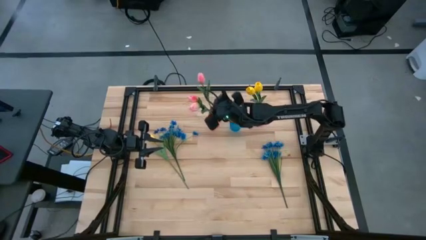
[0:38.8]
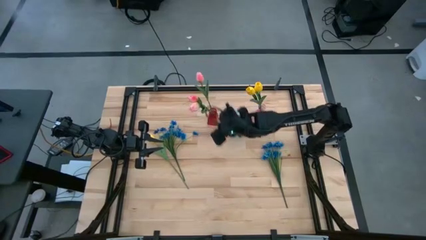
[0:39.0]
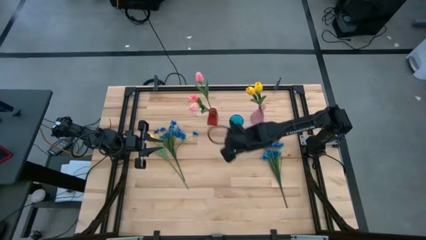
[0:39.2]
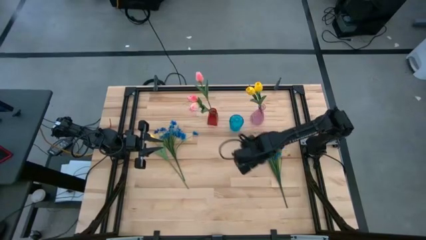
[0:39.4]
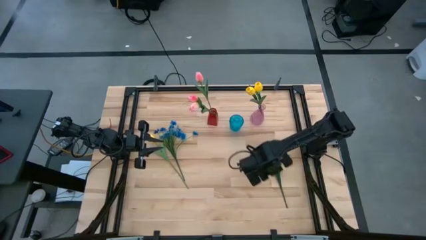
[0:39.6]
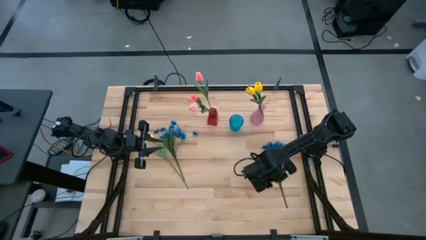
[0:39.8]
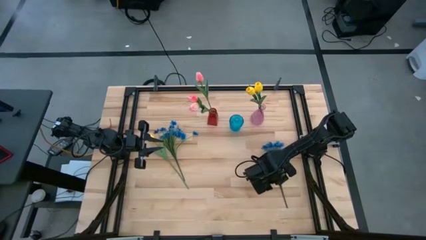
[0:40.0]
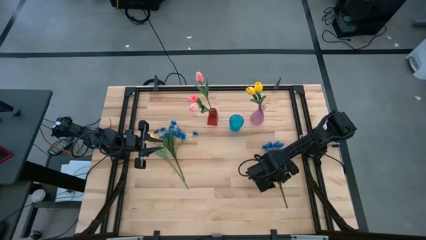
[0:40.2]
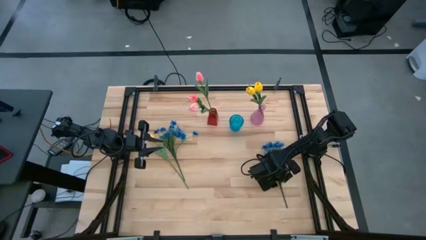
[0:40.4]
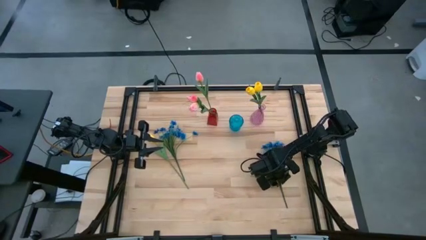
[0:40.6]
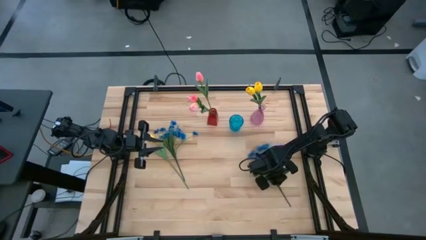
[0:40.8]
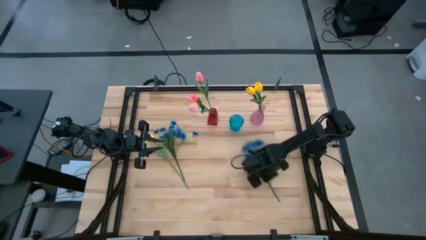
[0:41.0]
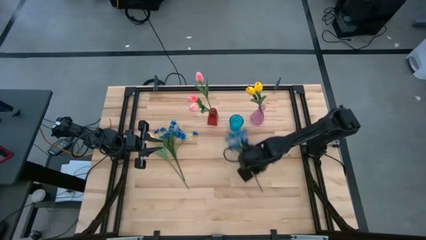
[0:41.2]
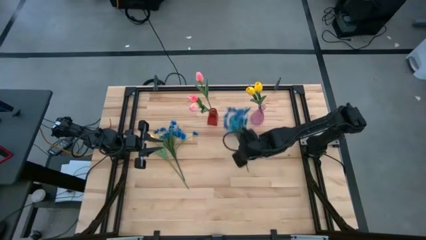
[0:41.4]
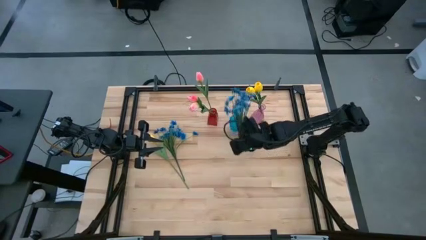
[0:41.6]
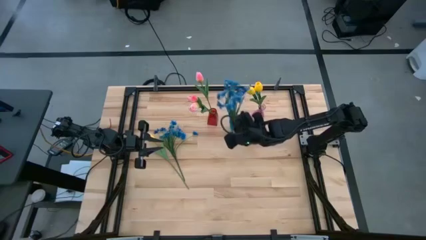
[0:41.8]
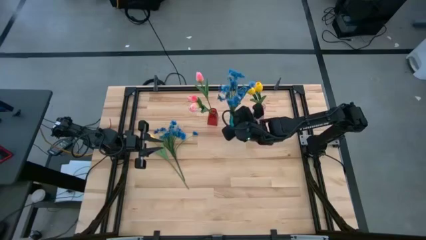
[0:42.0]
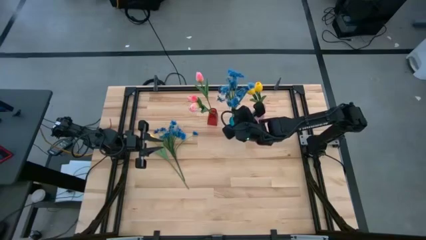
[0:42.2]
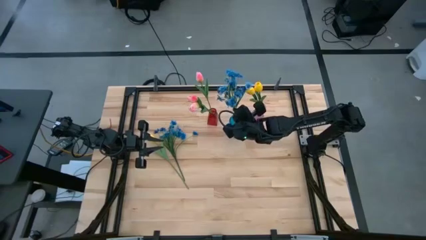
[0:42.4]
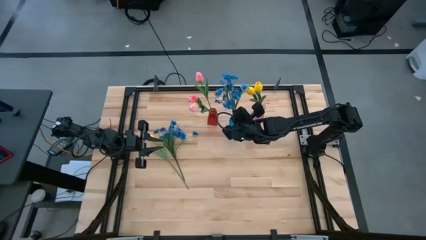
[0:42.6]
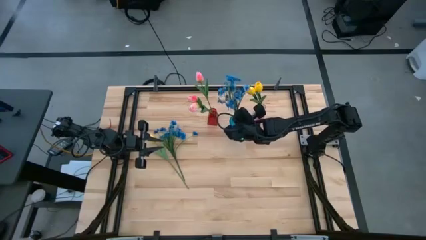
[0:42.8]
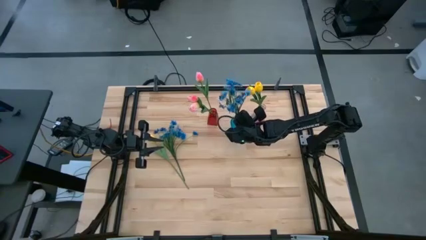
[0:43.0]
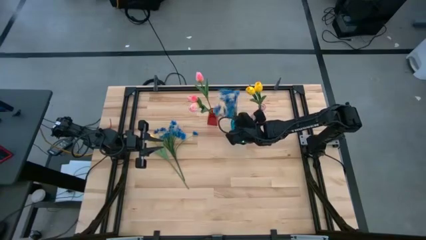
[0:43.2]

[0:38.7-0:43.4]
Task: Sort flowers into vase by color
Put the right blue flowers into the blue vase

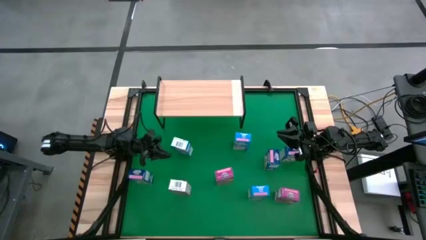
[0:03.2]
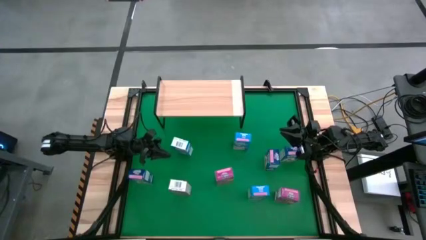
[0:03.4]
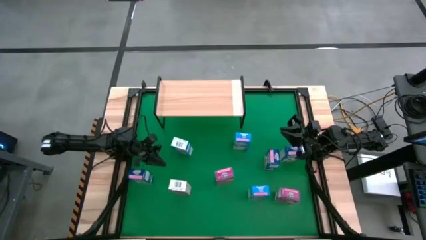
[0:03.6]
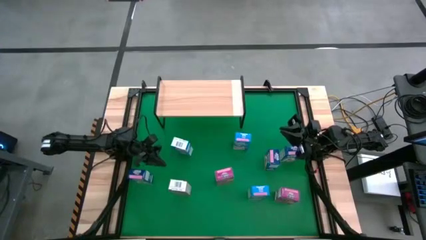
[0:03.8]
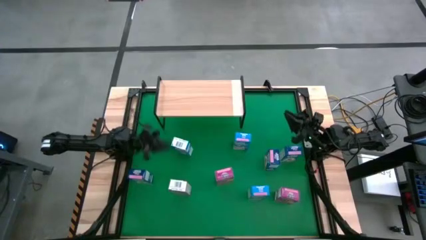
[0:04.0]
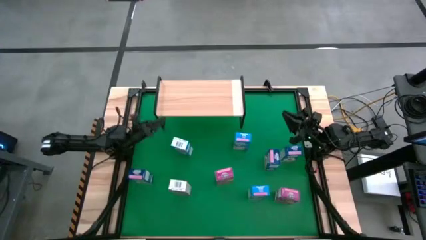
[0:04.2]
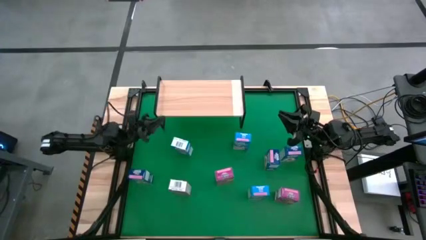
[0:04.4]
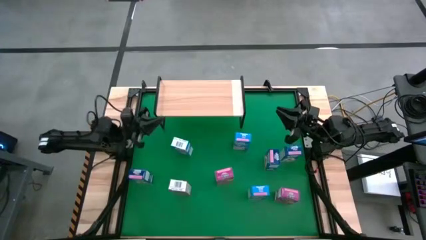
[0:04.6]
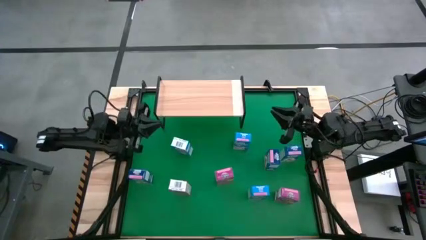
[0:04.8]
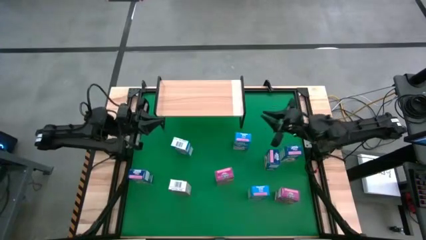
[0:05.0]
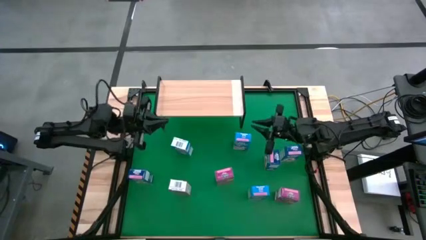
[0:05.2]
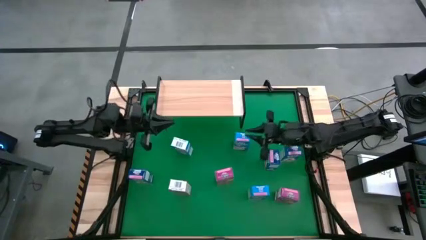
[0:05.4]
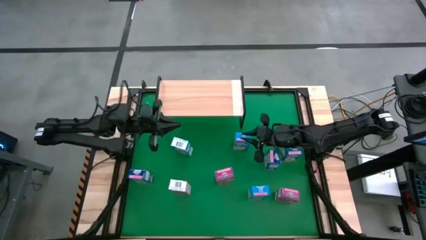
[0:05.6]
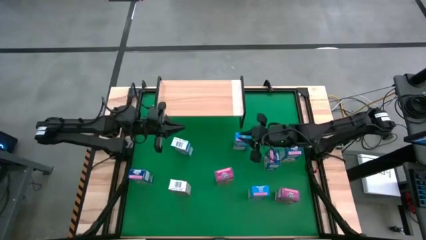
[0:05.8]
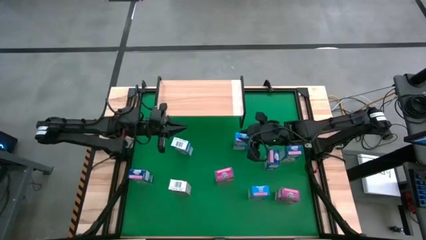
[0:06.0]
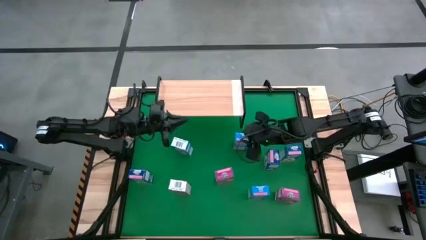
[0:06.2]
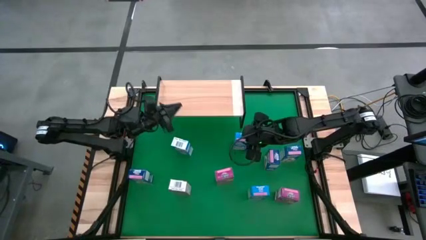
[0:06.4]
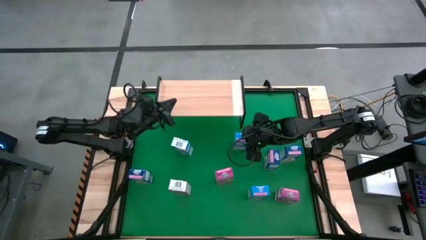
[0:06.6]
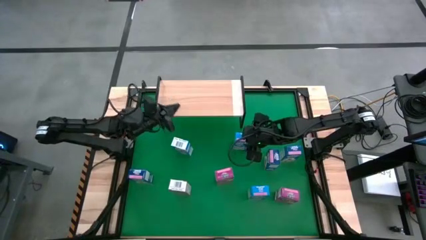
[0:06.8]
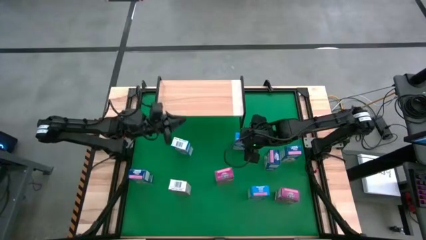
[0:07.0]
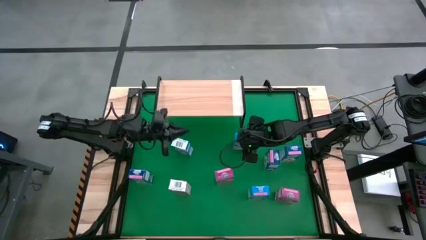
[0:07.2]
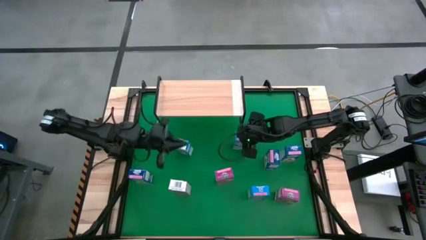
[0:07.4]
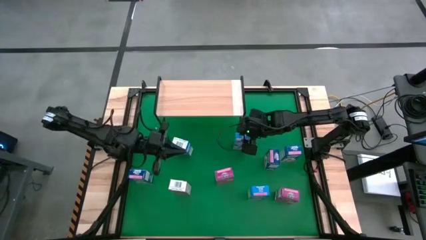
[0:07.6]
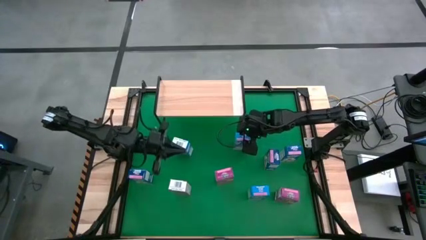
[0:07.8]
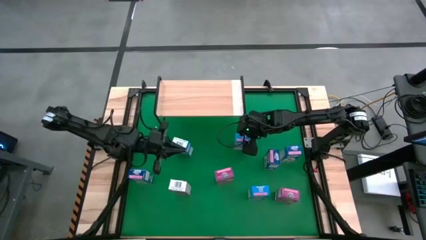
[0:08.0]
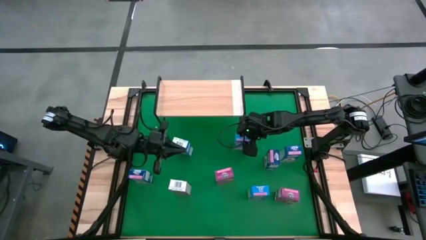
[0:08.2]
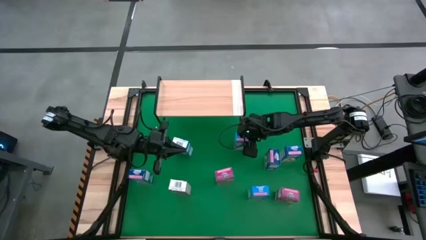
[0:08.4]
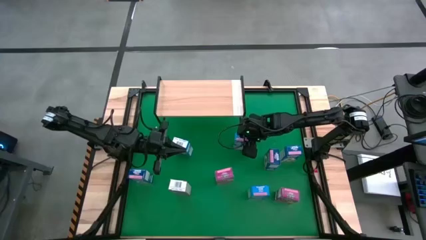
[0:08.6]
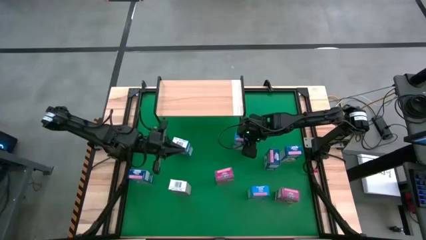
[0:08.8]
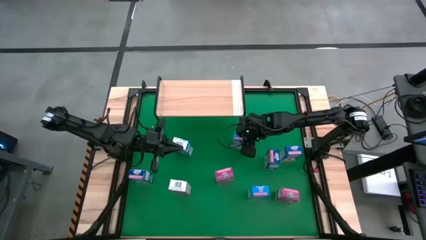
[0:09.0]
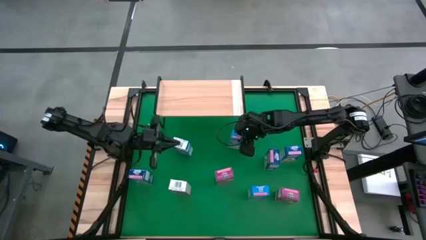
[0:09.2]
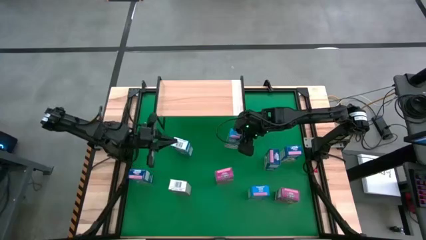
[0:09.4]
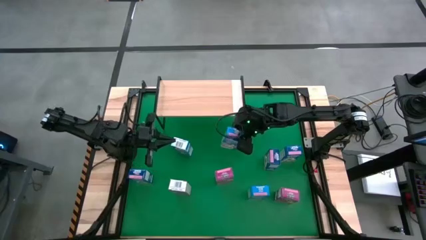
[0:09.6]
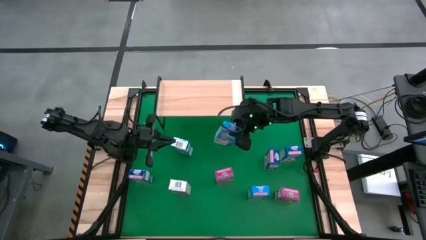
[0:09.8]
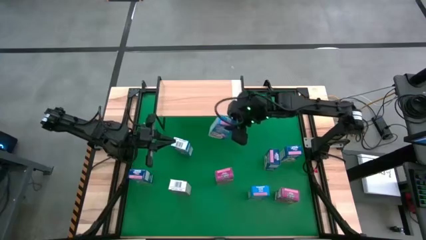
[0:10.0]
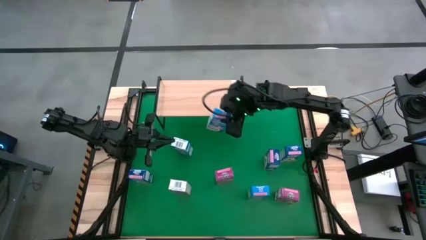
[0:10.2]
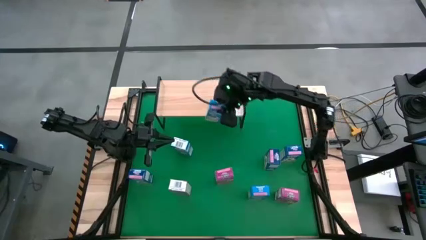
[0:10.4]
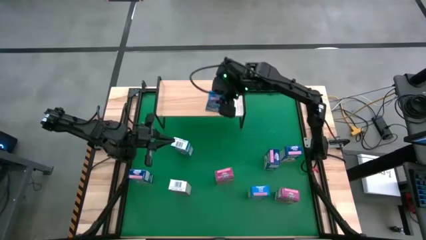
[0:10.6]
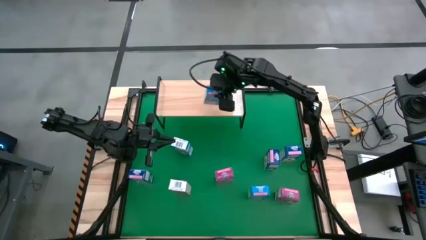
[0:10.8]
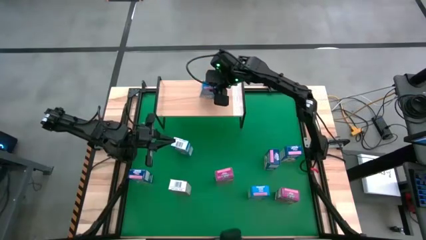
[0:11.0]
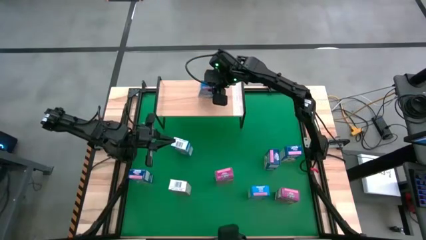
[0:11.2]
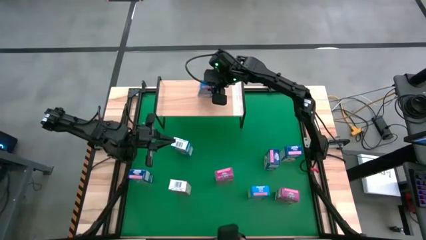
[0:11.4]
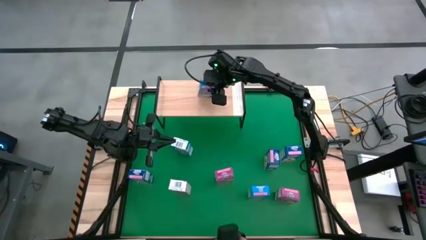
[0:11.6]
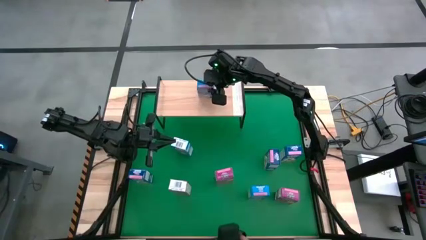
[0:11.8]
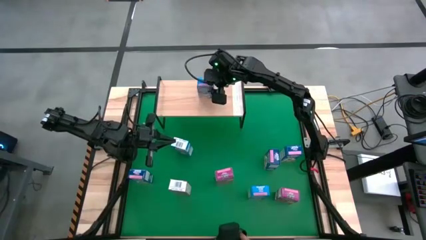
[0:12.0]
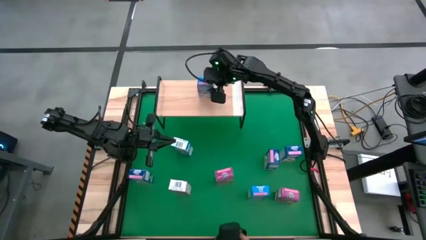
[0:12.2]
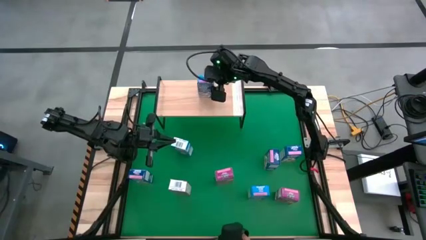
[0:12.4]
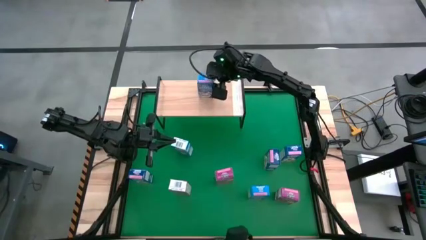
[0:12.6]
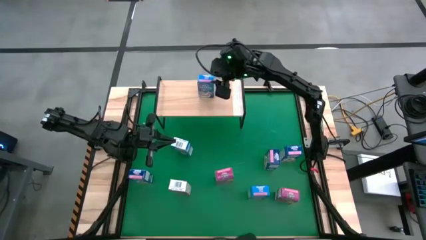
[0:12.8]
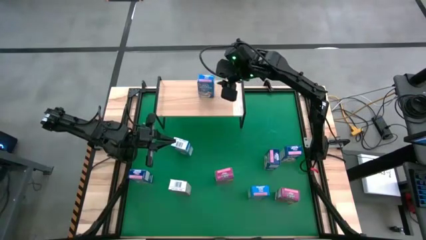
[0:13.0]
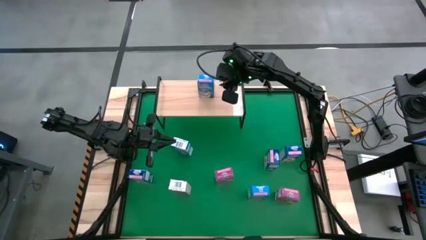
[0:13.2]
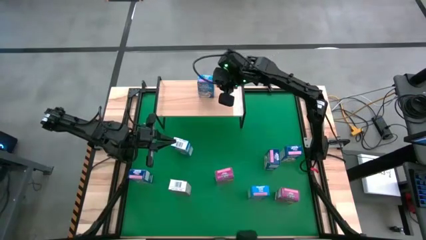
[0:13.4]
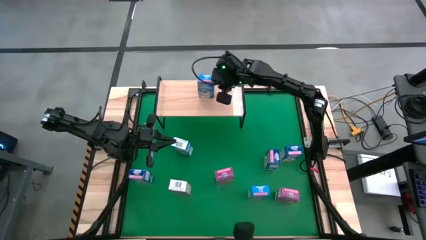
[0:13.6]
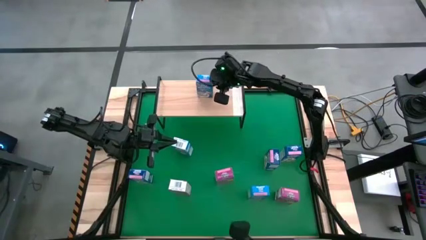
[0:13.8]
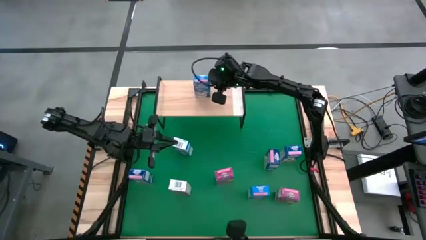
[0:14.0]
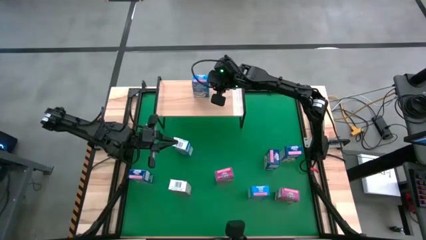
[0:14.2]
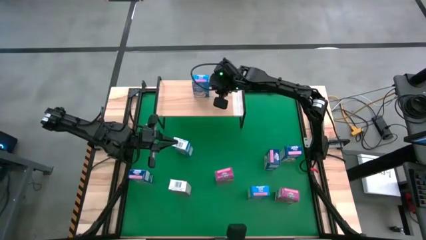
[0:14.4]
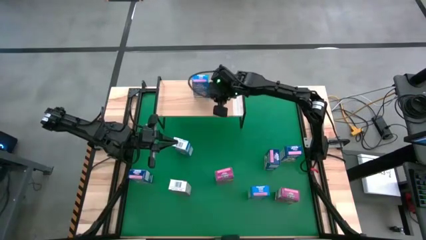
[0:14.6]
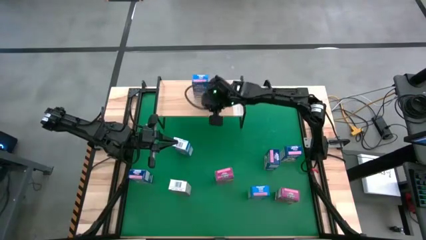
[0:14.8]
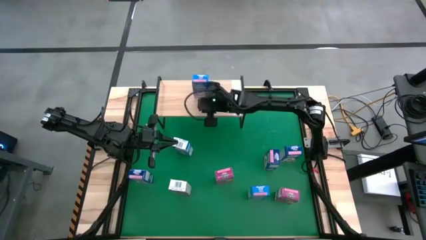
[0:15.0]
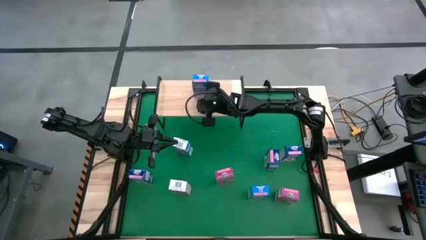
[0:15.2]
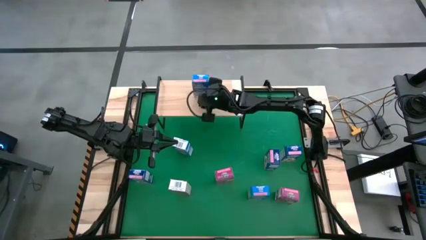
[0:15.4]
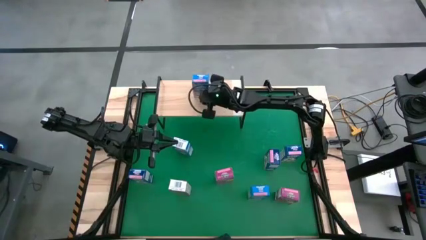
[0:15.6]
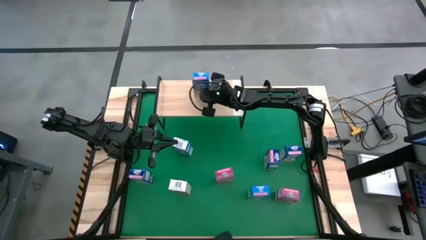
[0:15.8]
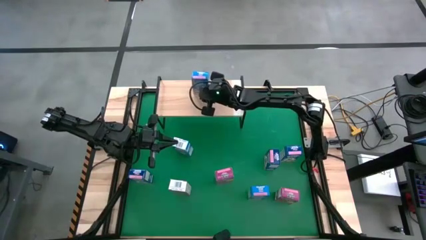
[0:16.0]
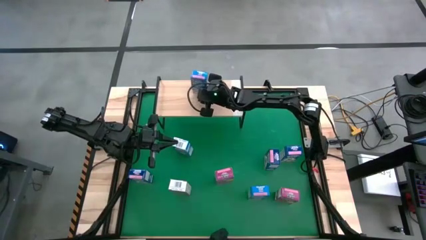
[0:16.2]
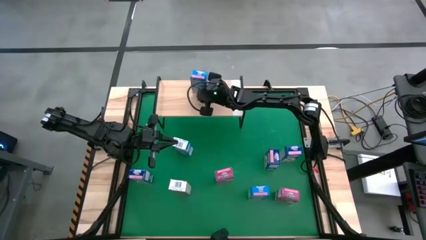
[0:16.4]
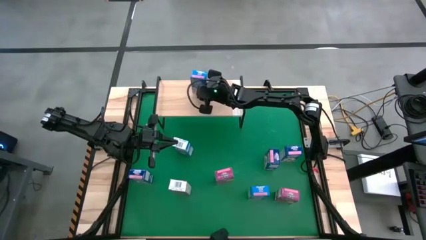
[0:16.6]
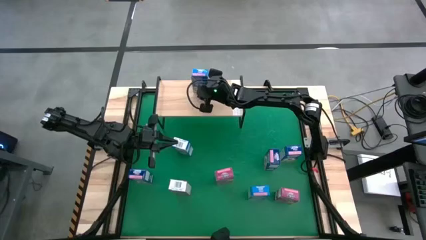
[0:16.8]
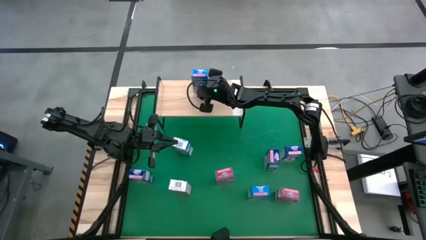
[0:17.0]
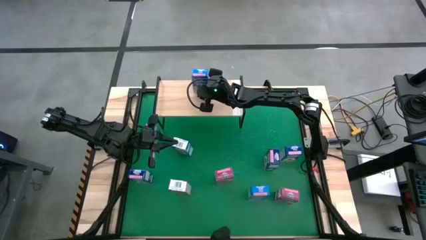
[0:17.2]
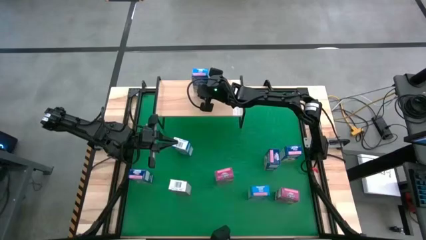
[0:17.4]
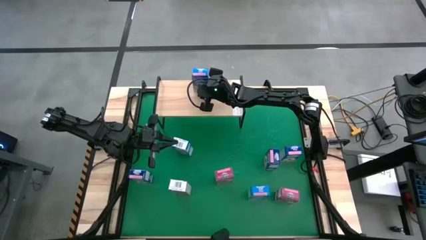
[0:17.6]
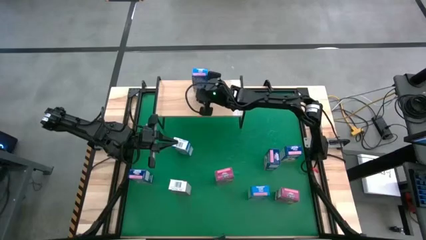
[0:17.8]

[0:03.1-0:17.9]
Task: Stack cereal on shelf
Put the top right light blue cereal box on the shelf
